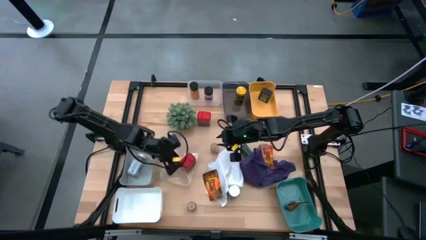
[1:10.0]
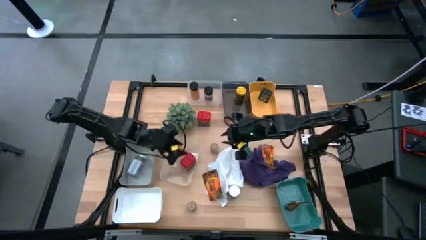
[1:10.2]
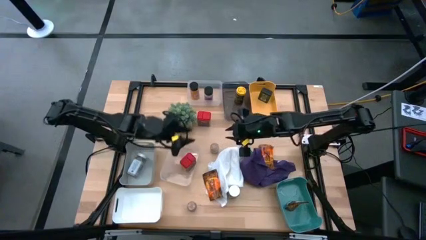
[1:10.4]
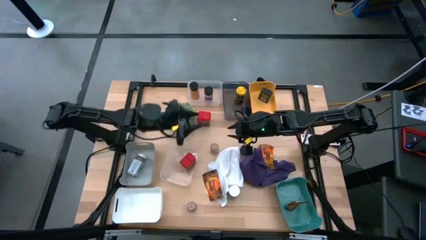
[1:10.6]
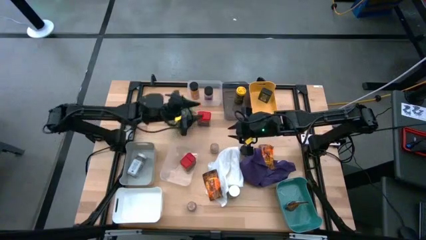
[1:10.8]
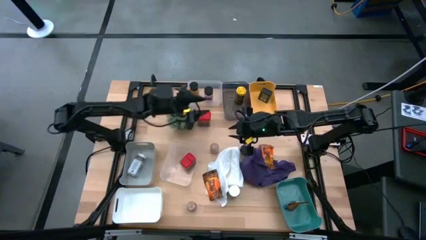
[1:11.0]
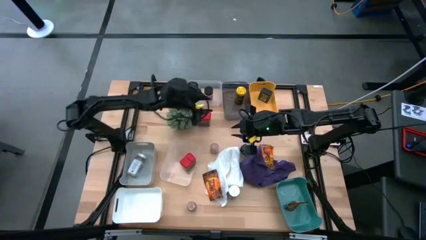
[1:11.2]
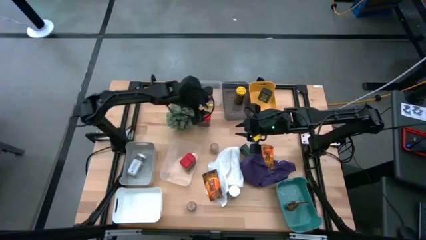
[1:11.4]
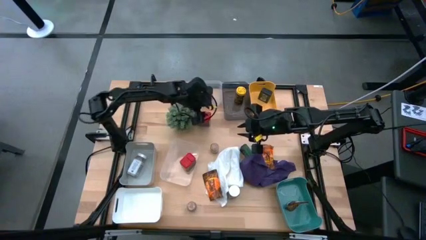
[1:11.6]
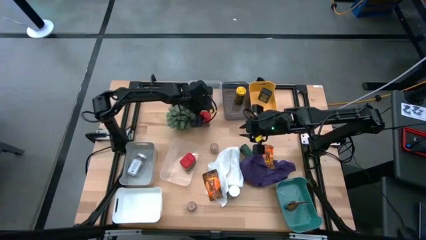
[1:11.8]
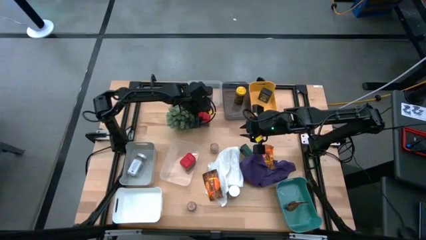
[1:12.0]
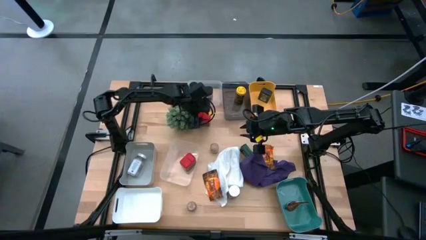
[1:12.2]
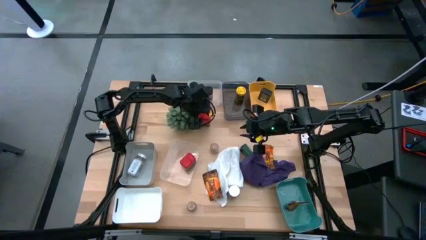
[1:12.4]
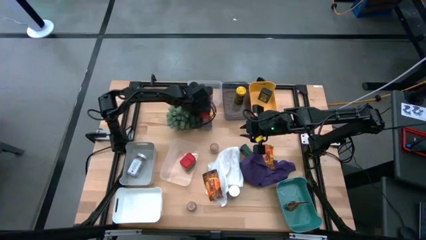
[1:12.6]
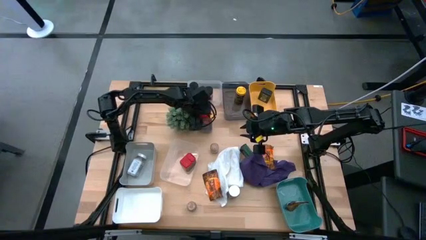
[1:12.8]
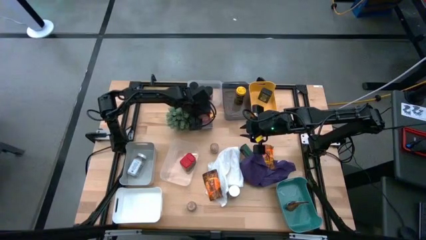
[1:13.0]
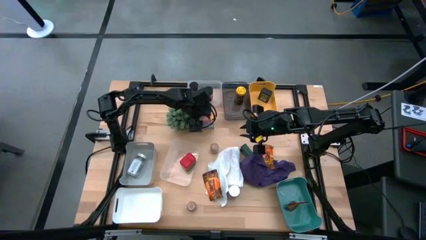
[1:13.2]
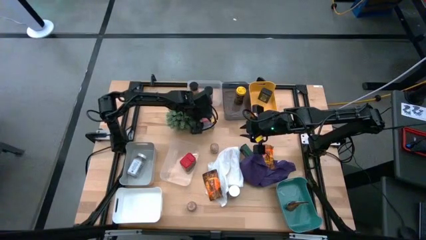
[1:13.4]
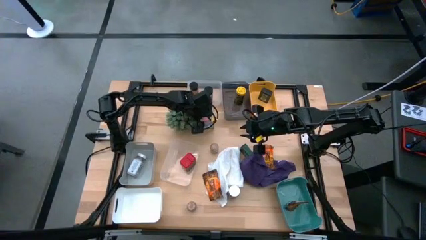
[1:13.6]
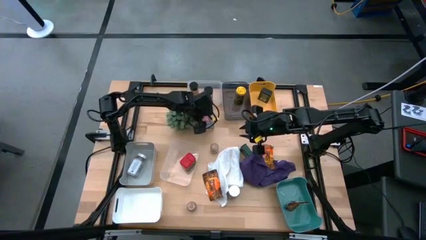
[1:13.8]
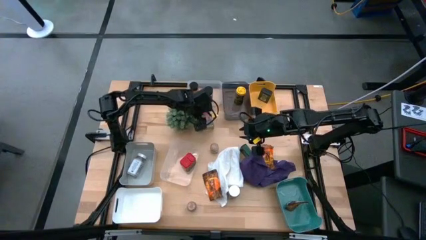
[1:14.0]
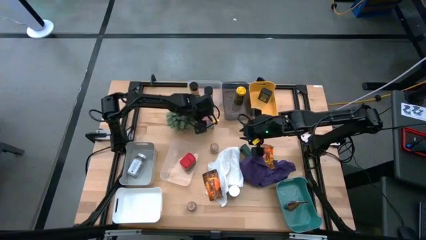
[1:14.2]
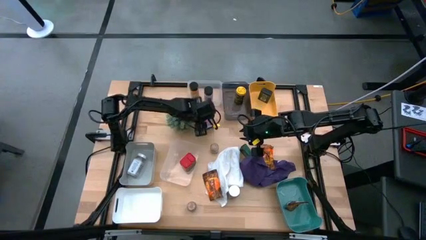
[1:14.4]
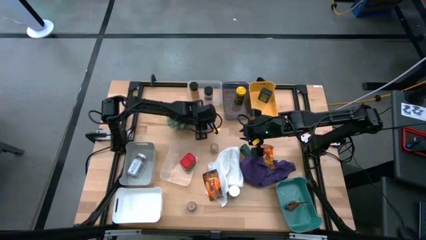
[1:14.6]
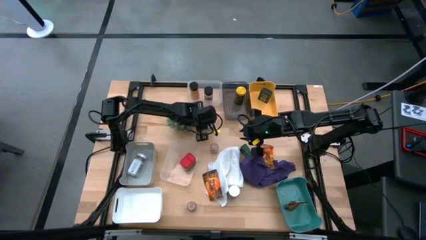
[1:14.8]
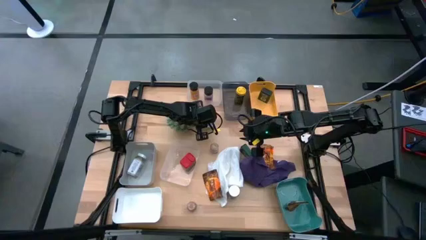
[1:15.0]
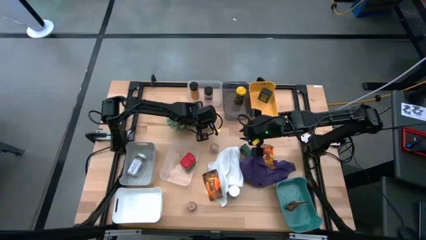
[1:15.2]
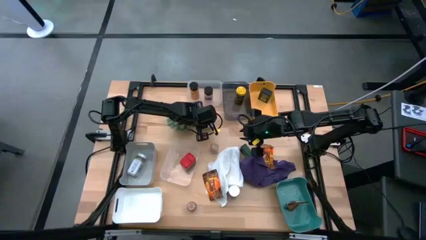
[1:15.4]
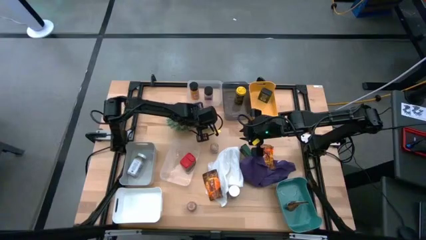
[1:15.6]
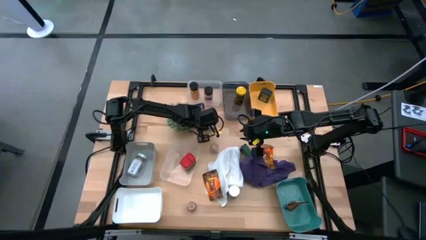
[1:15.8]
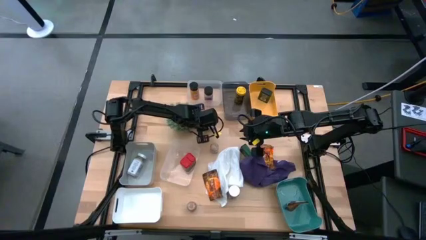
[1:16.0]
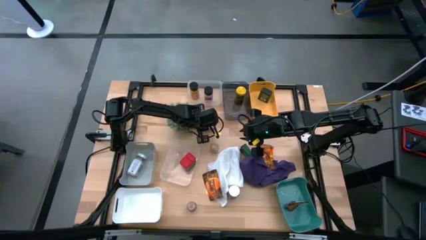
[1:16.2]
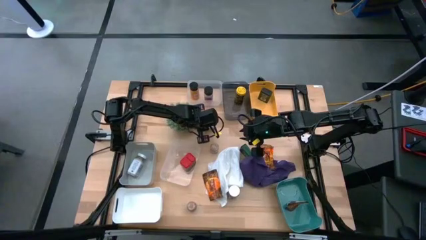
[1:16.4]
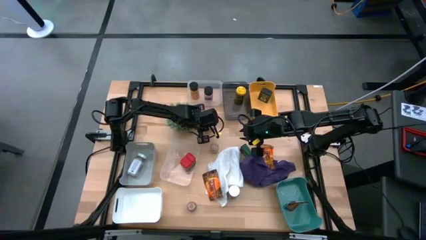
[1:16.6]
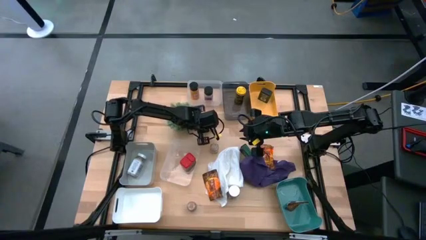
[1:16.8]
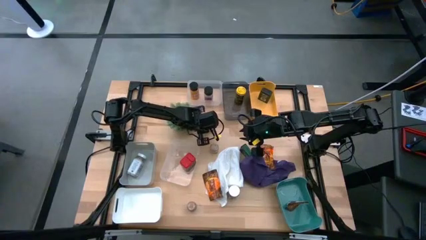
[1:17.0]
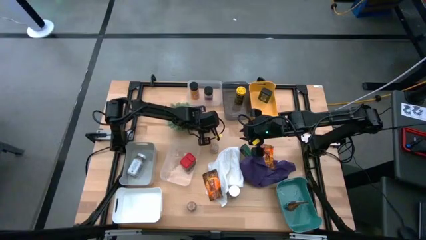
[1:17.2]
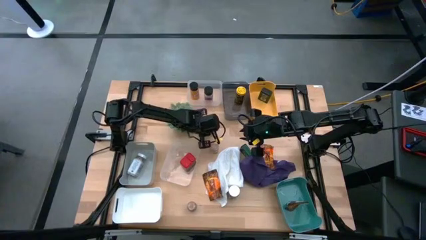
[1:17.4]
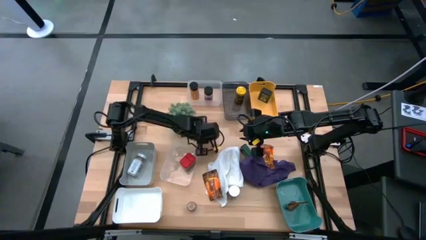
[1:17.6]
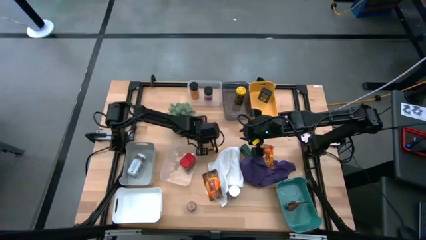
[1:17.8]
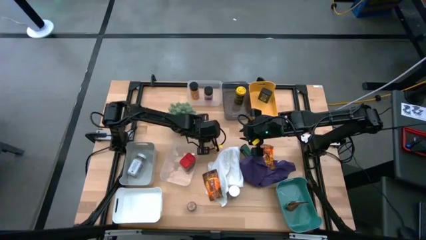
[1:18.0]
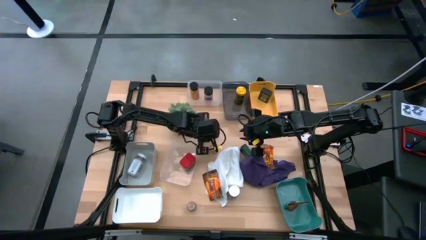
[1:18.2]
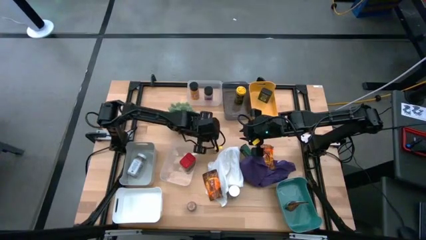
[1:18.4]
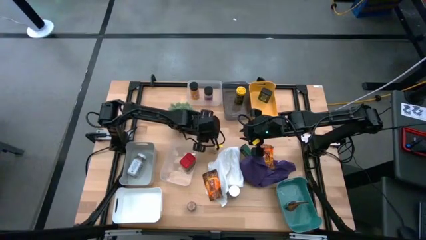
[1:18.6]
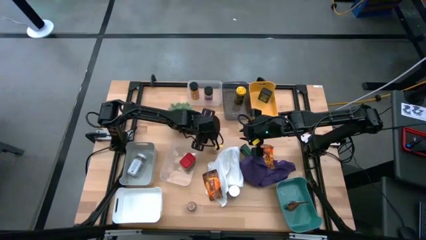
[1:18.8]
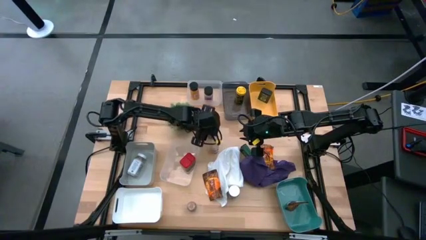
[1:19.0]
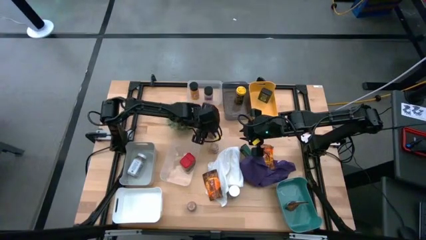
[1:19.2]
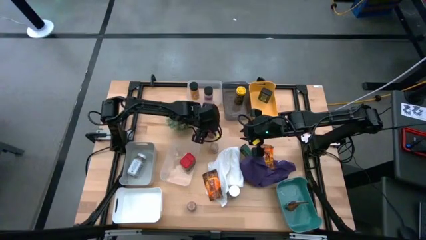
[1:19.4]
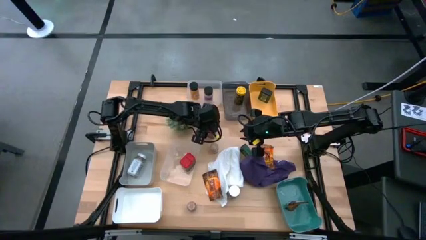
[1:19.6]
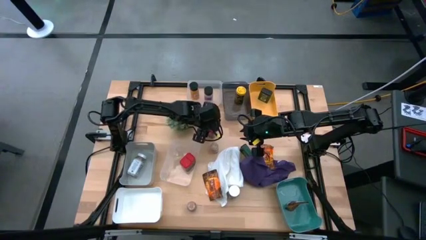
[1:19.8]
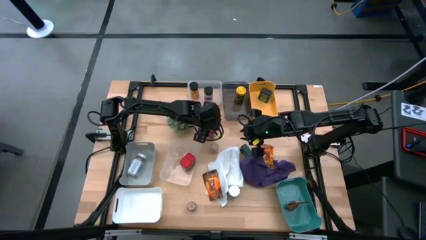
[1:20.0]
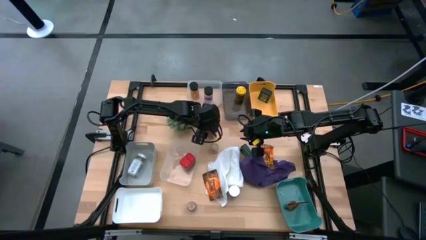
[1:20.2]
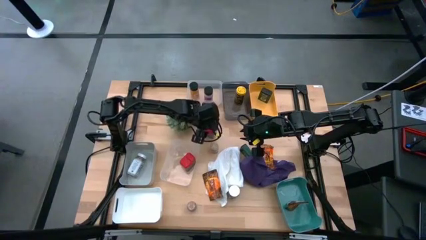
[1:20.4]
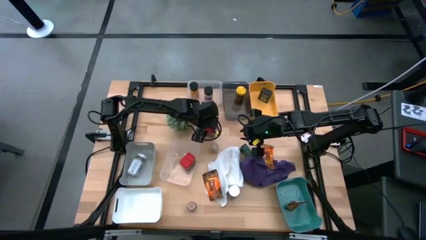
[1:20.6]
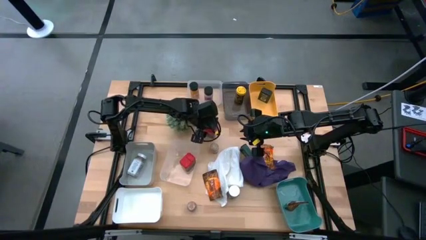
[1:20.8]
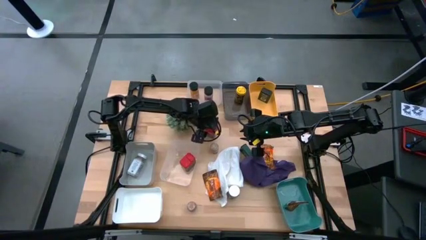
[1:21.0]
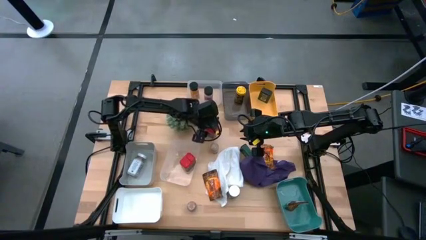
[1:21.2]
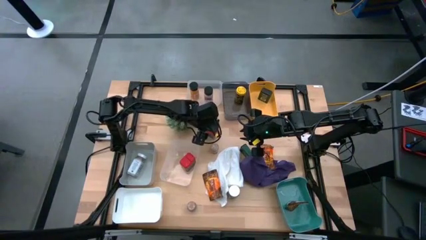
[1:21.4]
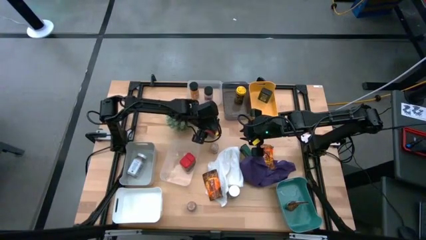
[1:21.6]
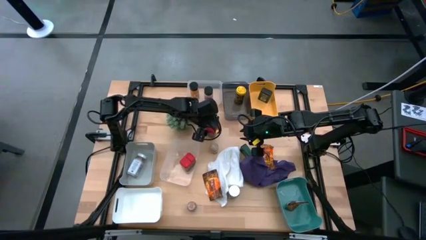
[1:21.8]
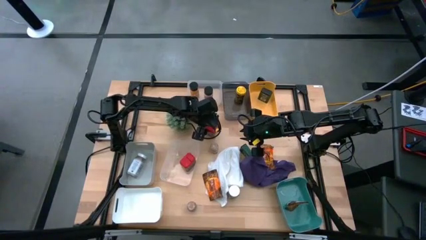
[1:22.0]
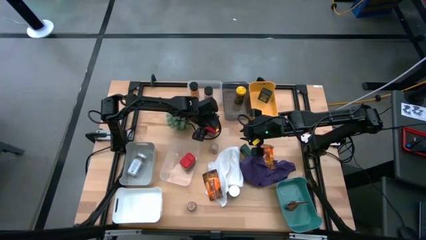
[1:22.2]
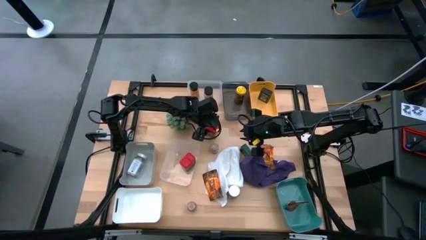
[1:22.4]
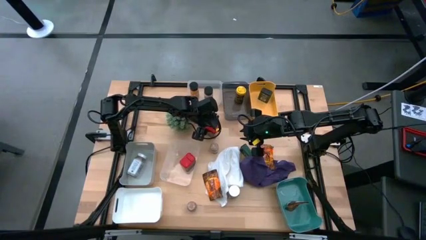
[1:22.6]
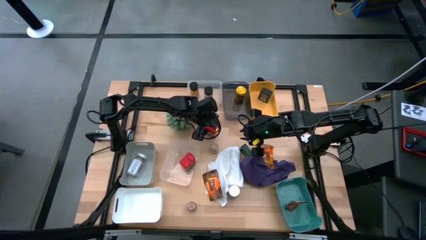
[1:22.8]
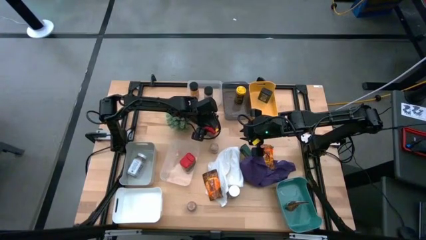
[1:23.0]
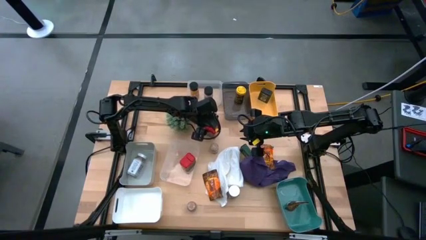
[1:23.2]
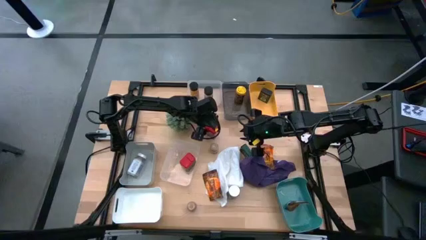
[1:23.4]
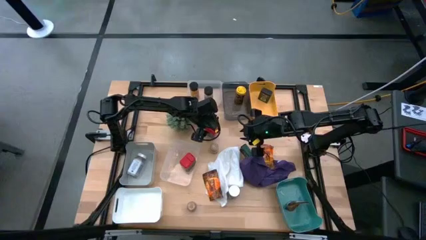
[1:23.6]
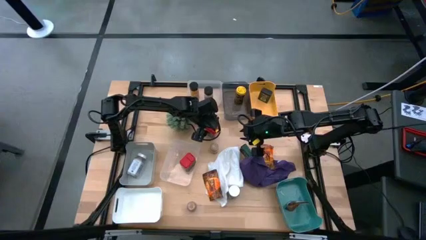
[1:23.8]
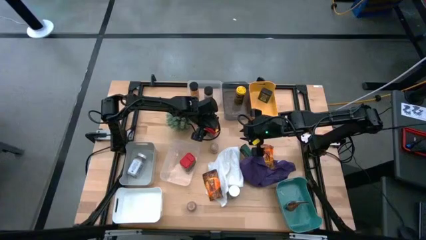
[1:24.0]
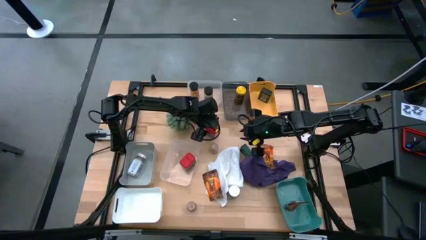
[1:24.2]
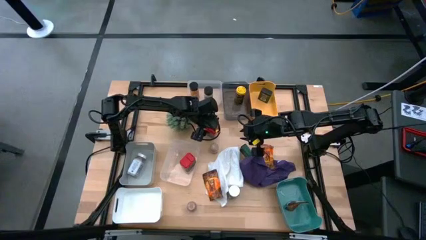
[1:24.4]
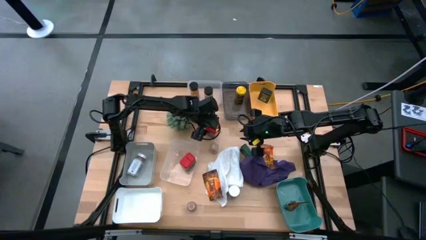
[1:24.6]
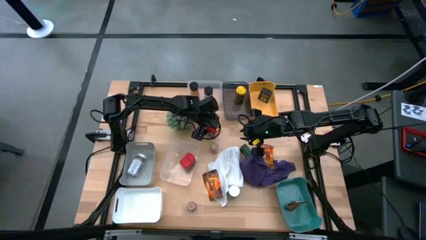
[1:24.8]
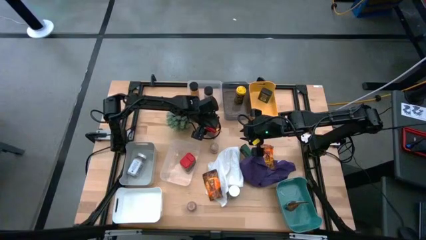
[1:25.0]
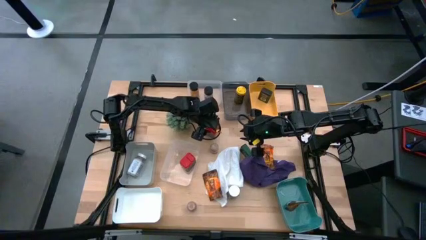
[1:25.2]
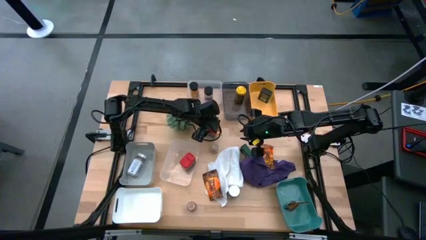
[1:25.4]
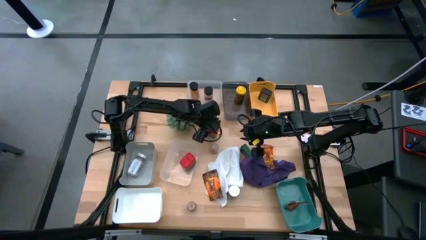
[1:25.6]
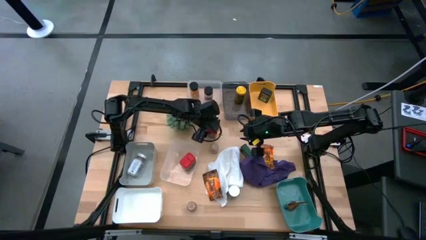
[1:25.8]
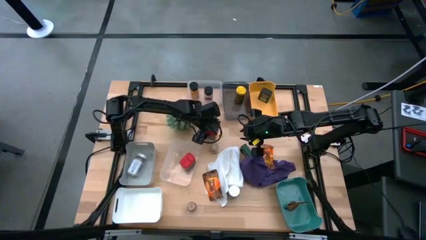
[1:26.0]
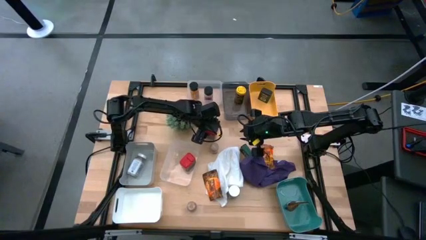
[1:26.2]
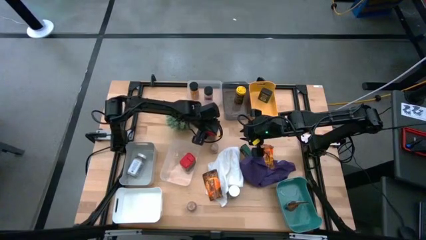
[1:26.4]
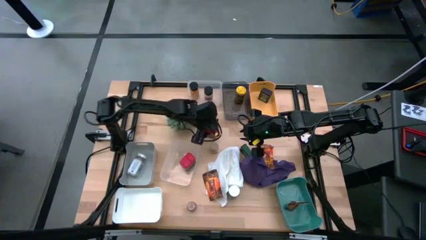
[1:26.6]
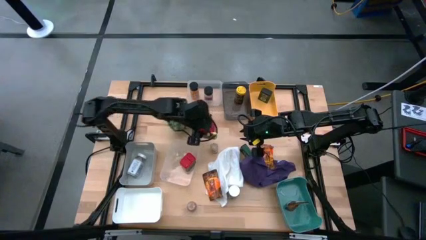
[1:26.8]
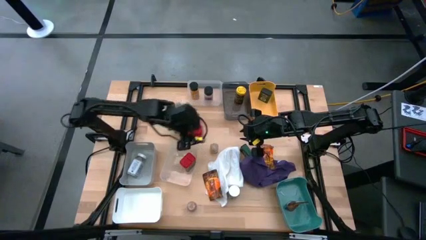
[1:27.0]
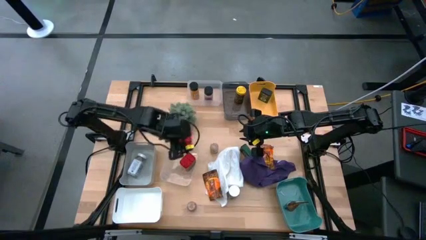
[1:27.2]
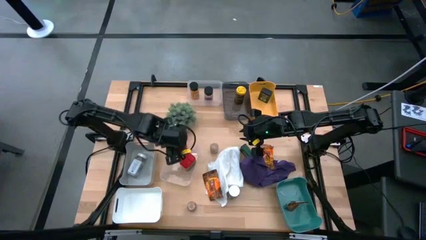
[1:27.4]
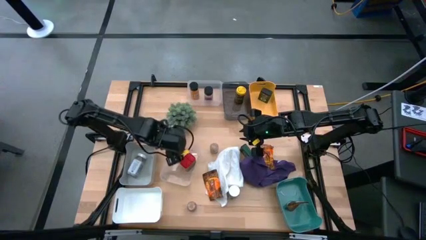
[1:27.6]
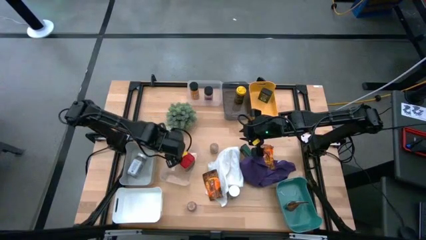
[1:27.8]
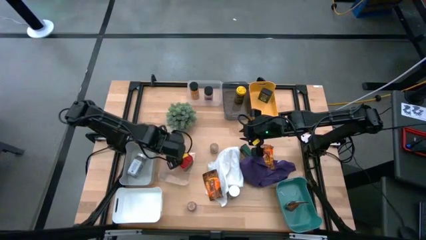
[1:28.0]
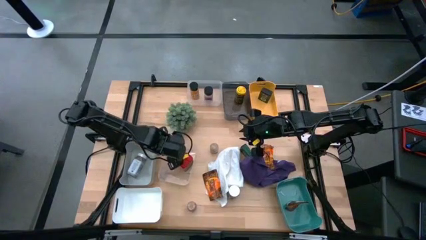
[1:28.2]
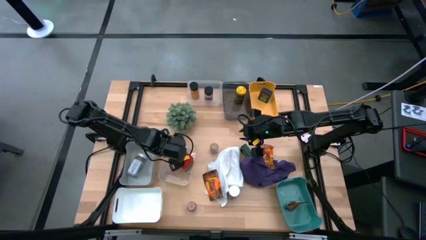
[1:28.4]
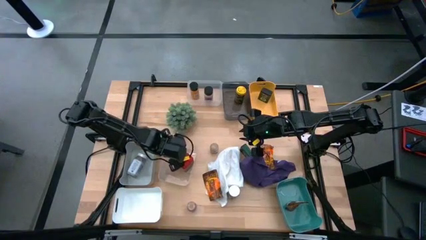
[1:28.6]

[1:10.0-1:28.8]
Task: Sort spices by type
Put the red seasoning can into the bottom transparent bin
